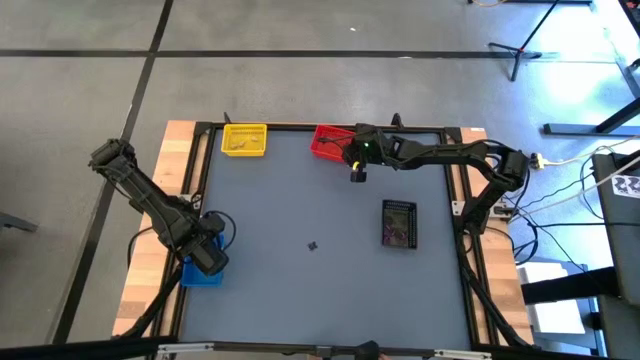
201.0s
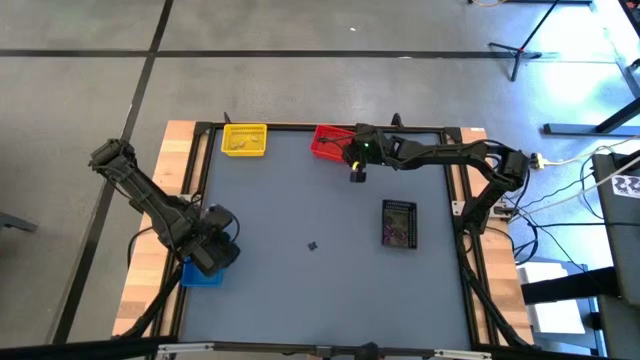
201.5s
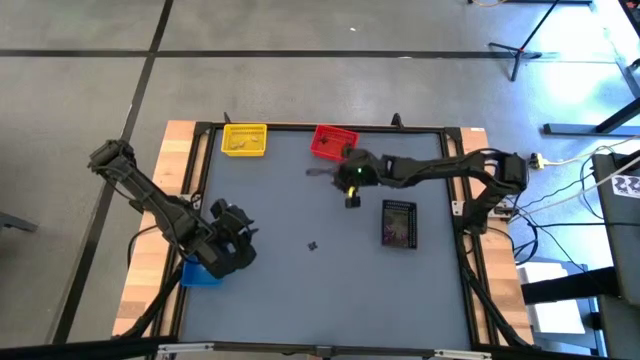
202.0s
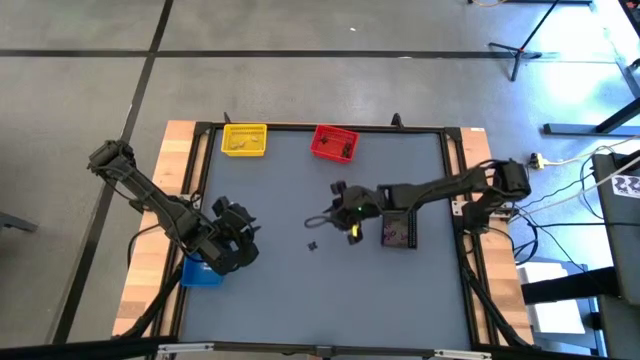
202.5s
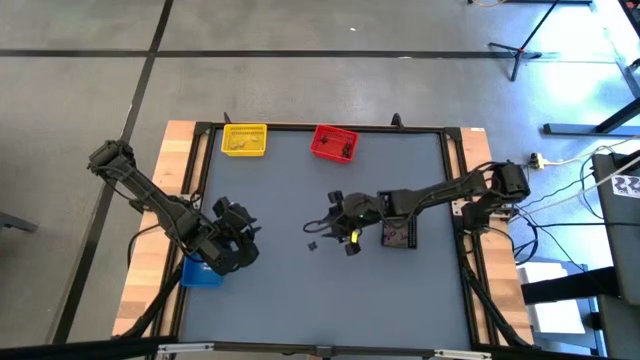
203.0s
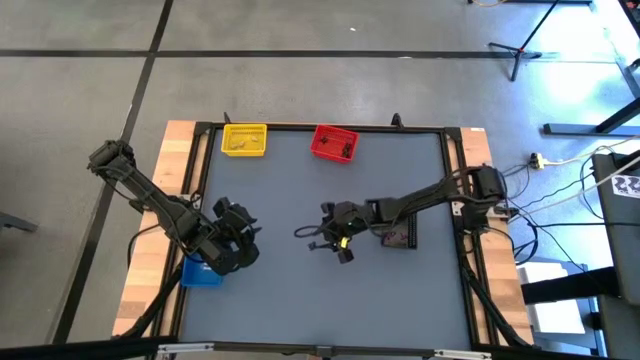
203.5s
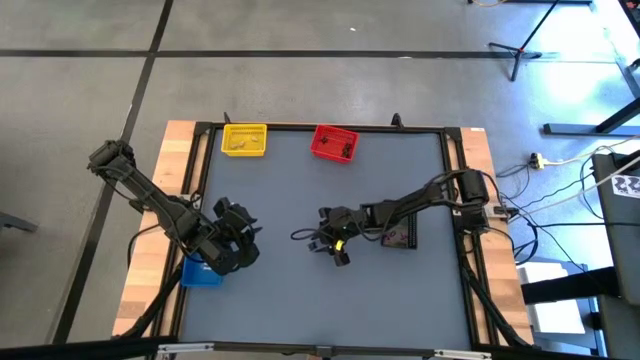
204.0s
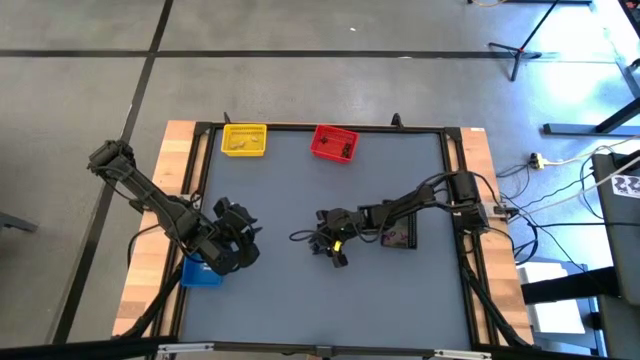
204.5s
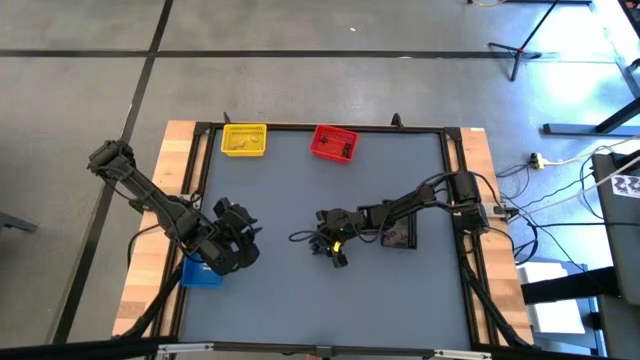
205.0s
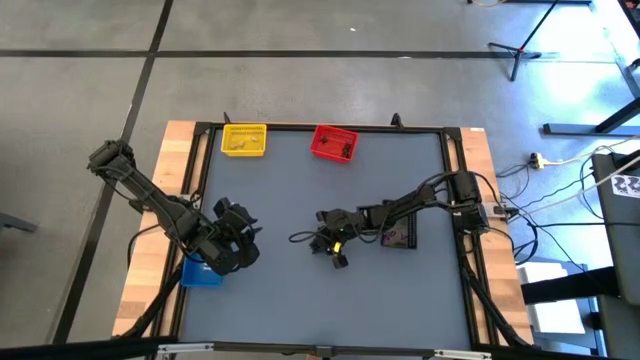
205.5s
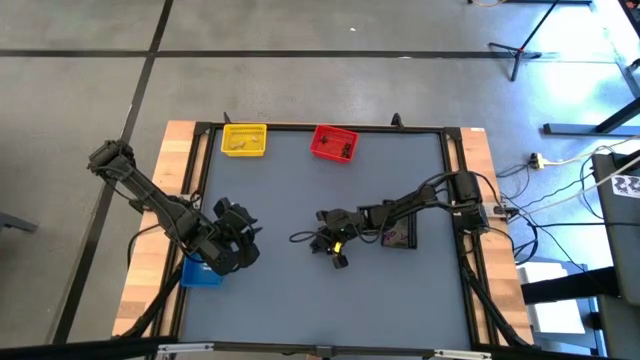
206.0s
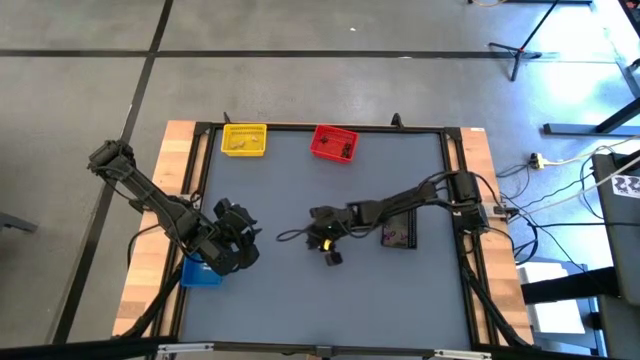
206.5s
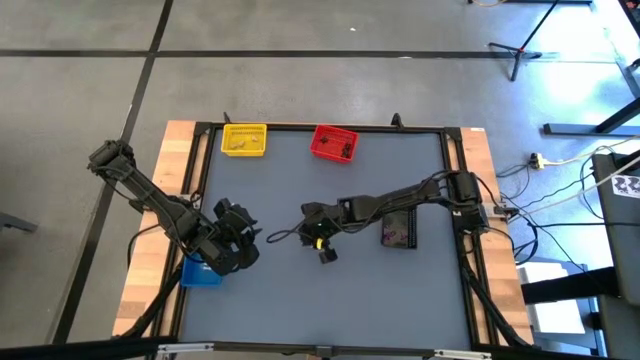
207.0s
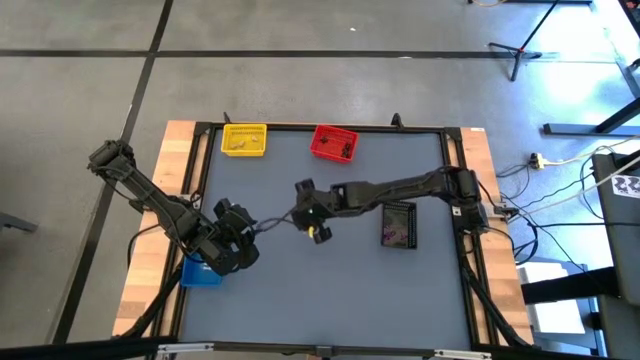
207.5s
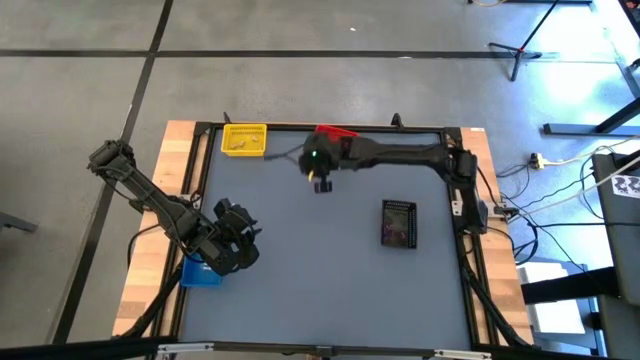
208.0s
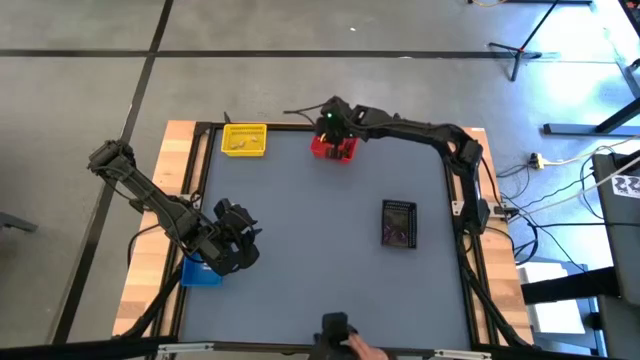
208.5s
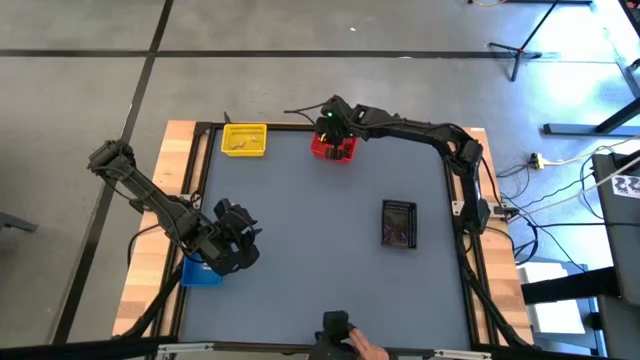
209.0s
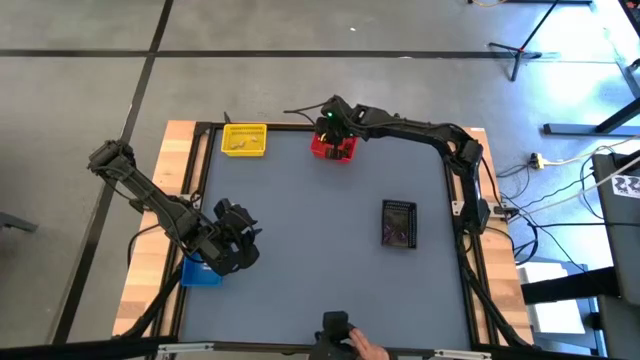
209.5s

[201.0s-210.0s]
Task: Sort Halloween decoration
Put the black spider toy into the red bin

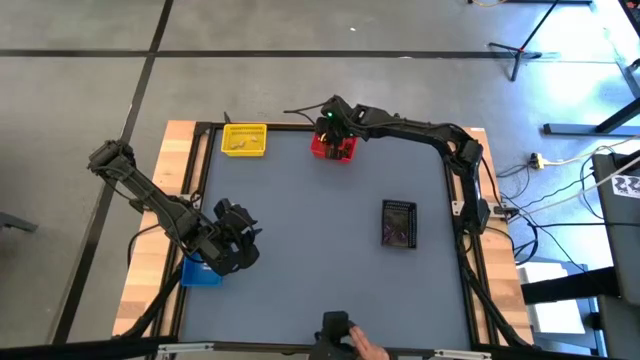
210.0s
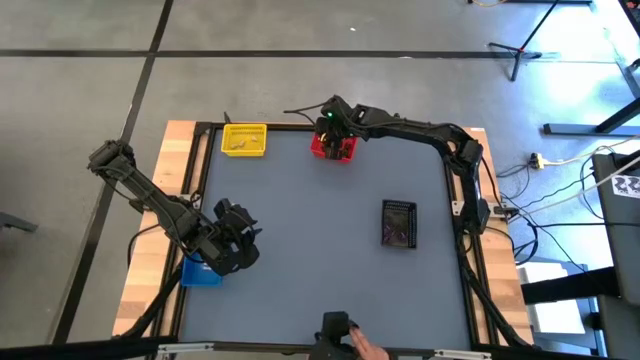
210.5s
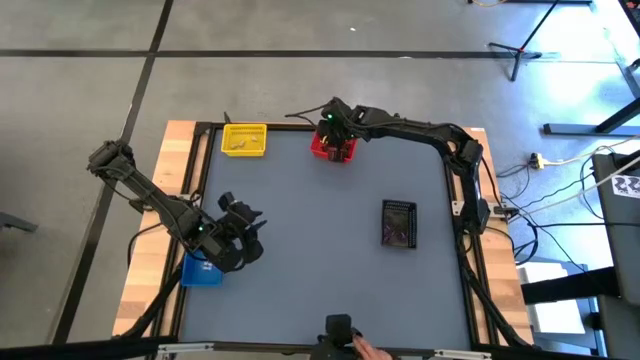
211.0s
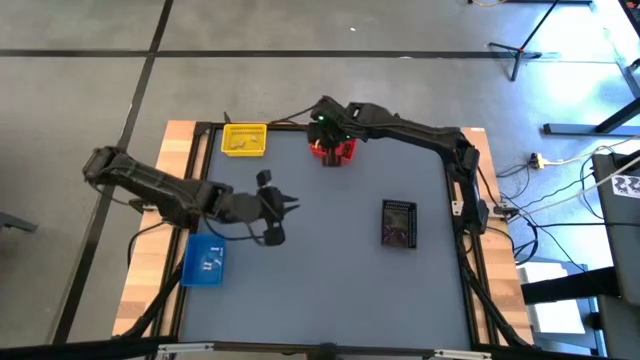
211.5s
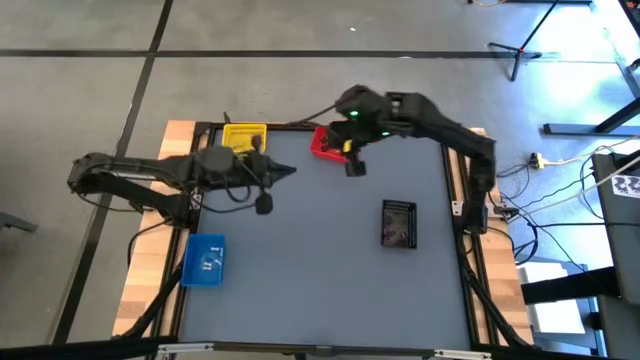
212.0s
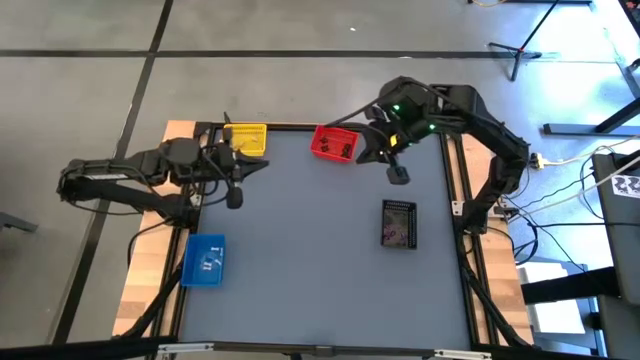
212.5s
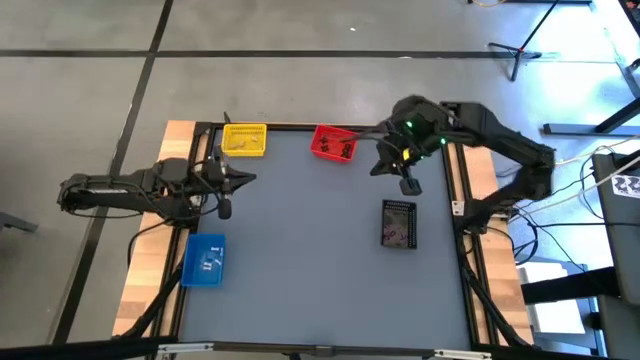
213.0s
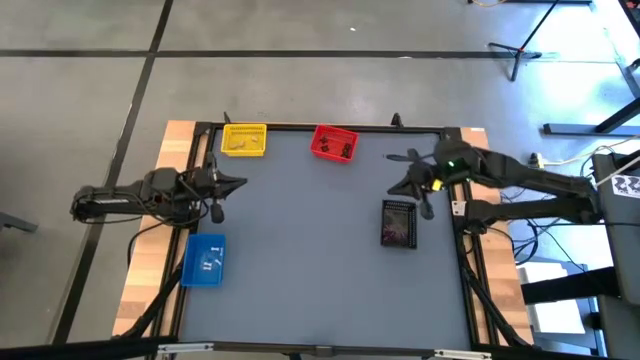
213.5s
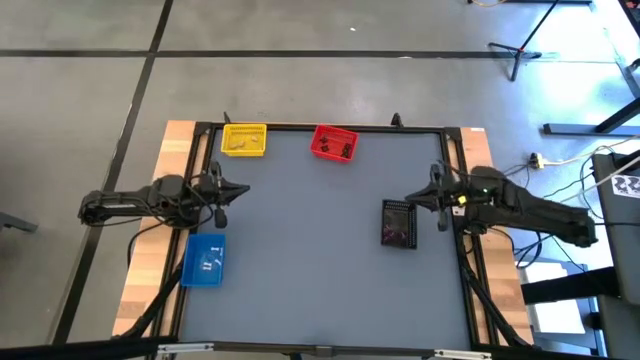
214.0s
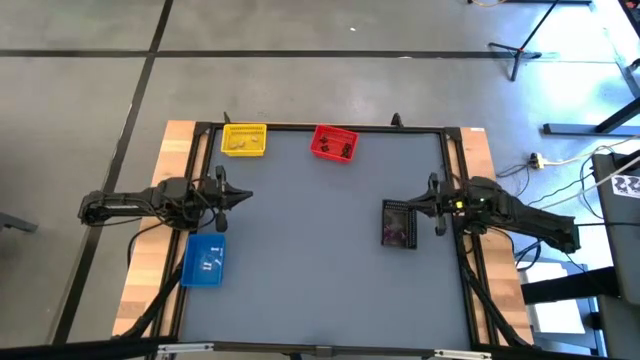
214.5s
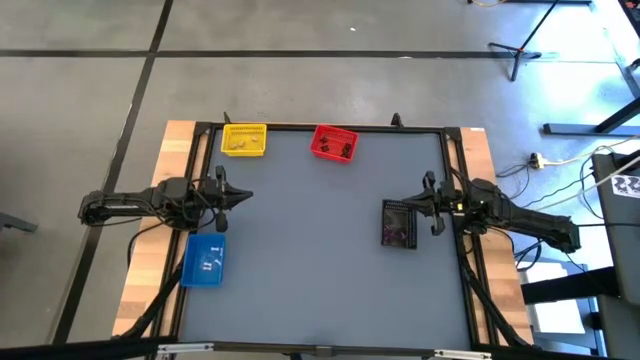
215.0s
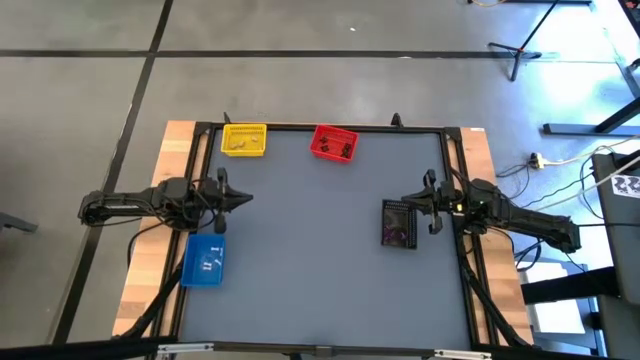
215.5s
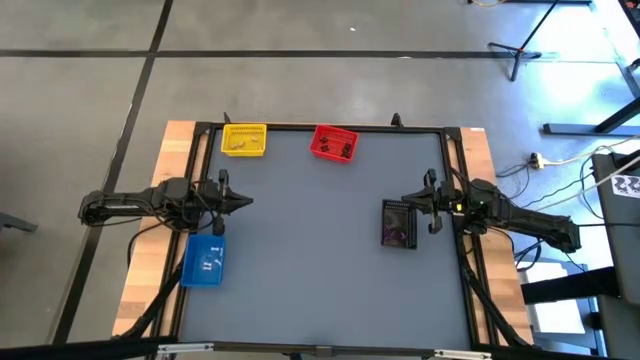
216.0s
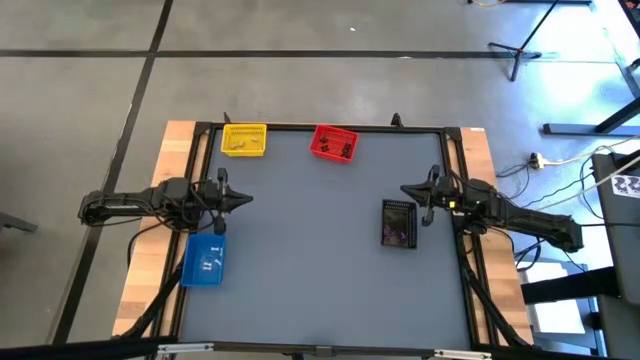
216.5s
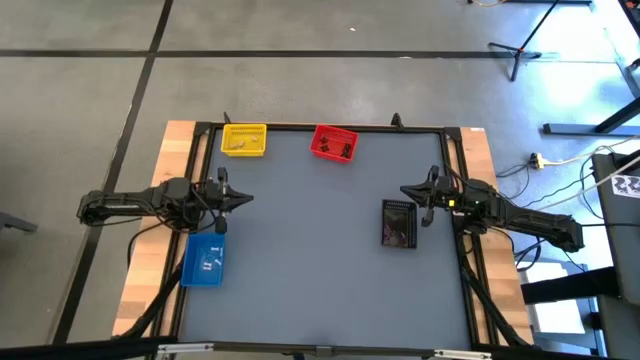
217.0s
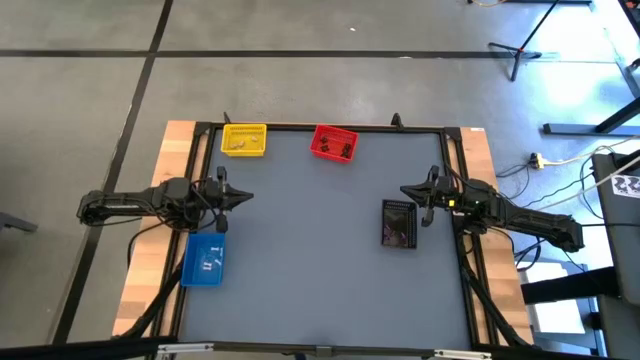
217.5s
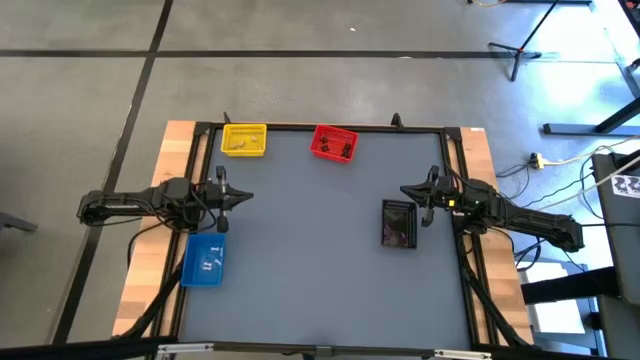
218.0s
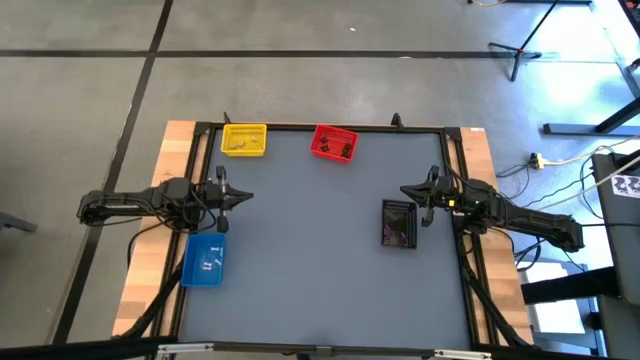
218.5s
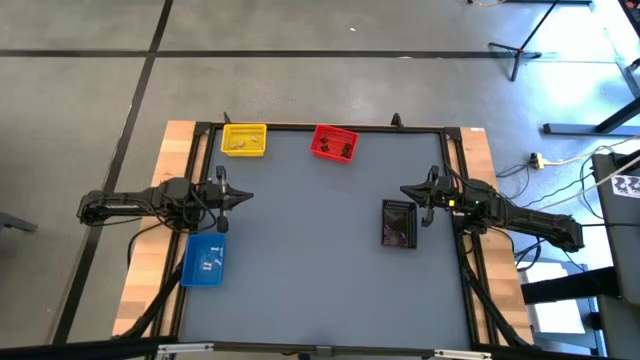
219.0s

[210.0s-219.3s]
Return to Home Position

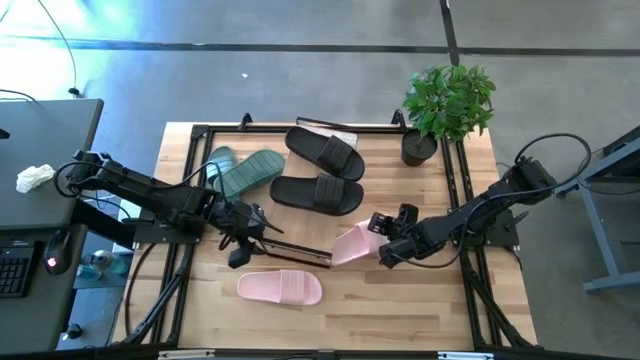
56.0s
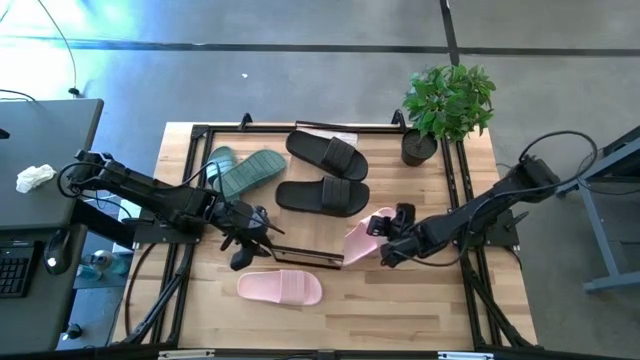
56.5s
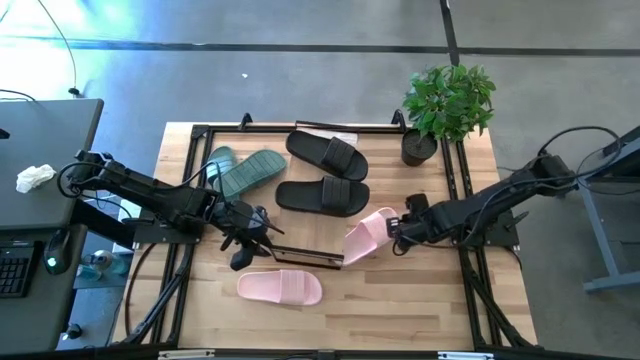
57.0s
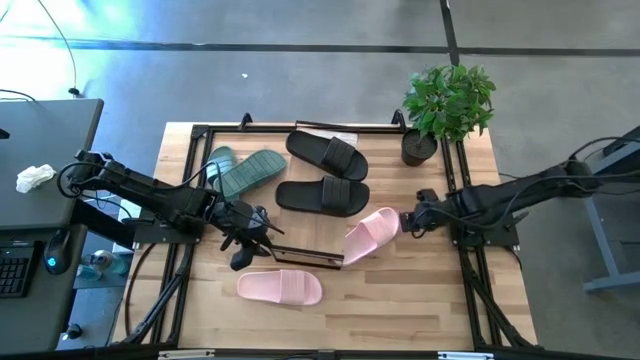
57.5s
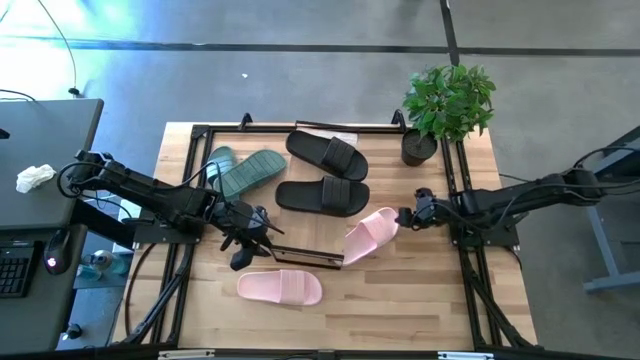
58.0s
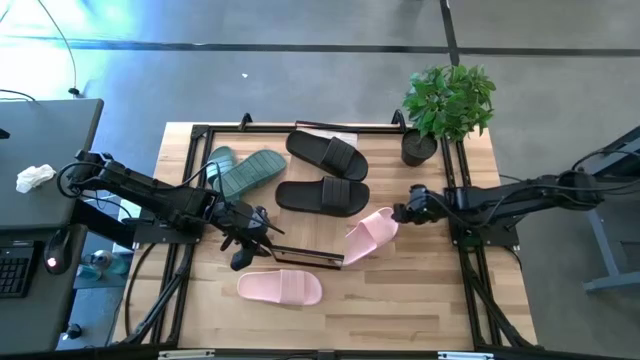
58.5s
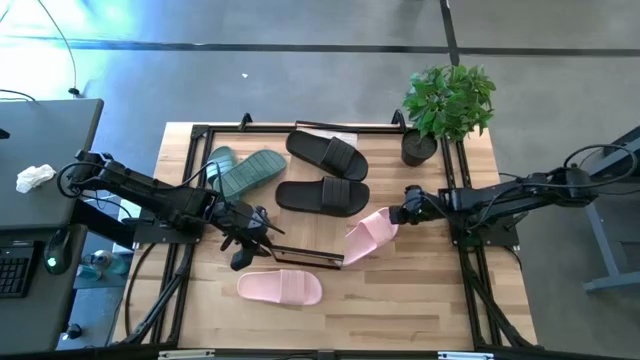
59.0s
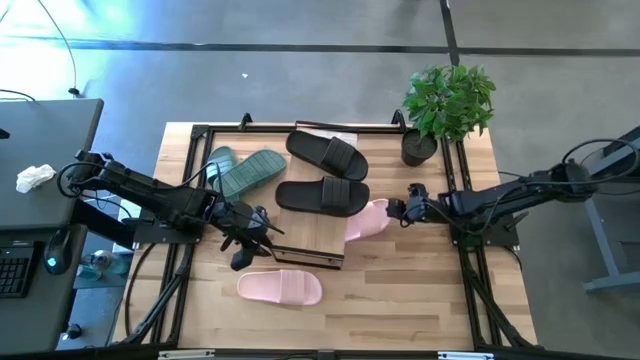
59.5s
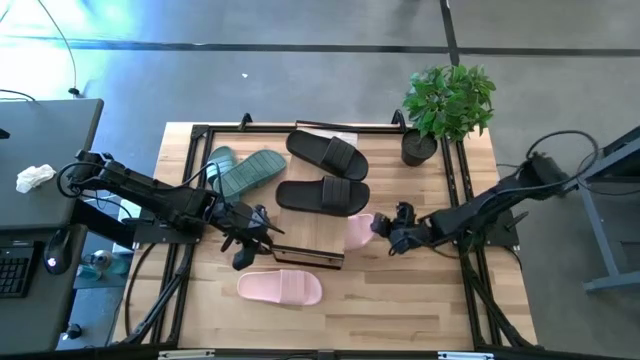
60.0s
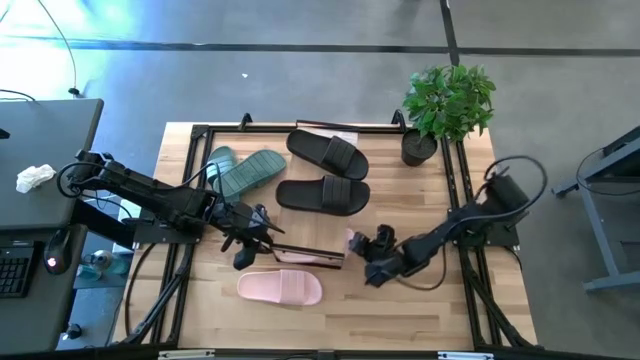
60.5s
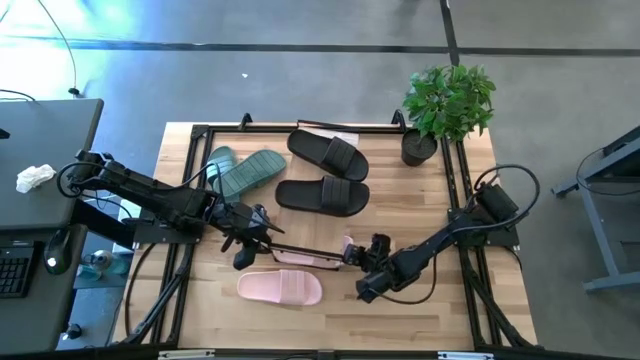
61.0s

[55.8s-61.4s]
Task: Pick and place slides into the shelf
Put the right pink slide under the shelf
